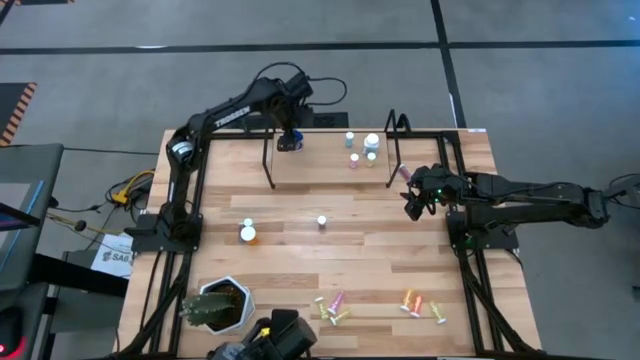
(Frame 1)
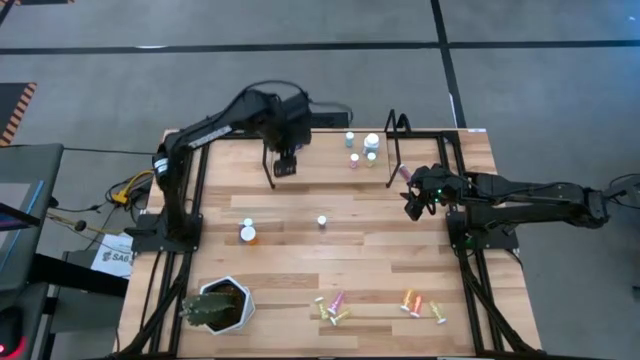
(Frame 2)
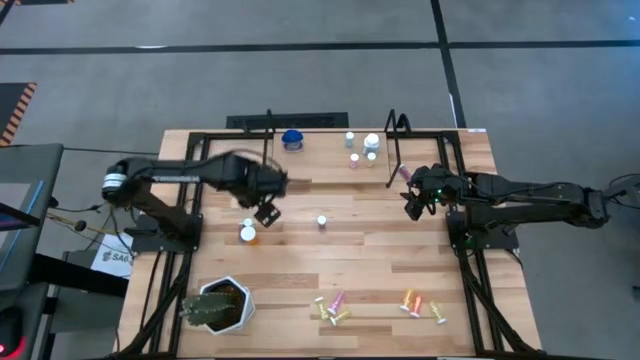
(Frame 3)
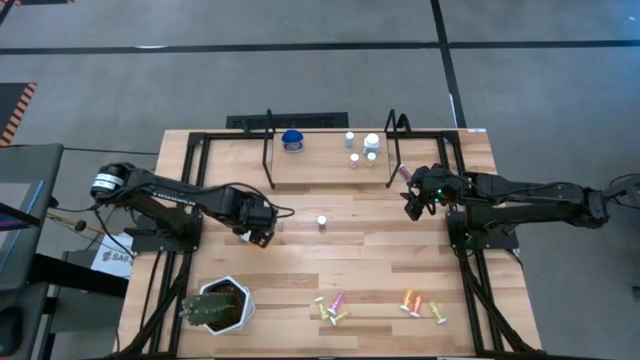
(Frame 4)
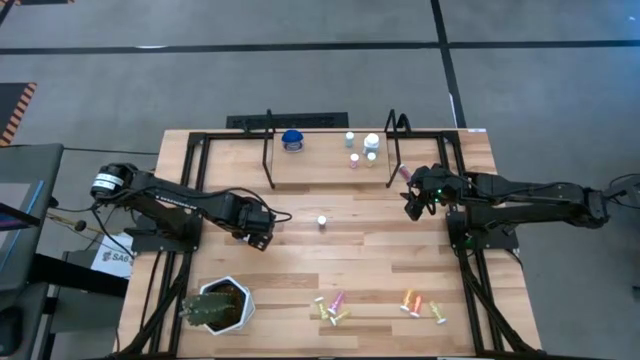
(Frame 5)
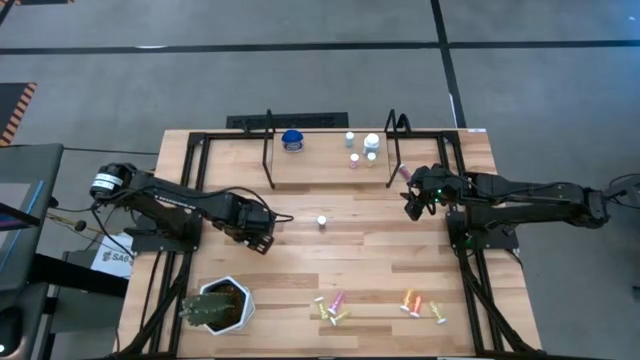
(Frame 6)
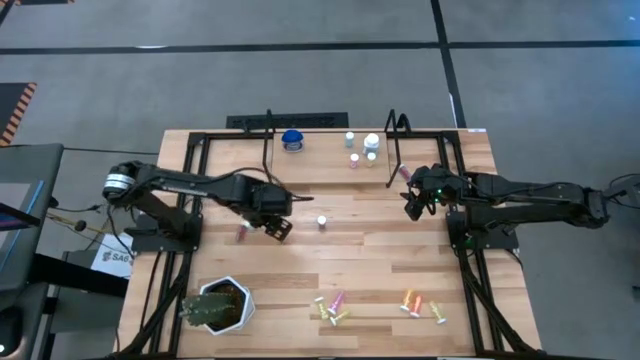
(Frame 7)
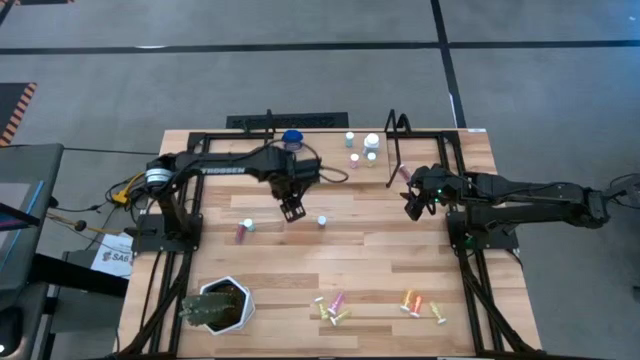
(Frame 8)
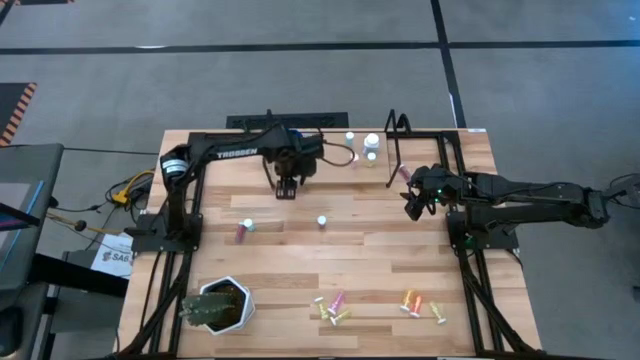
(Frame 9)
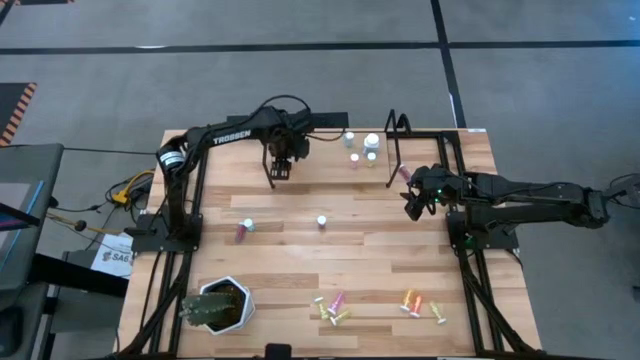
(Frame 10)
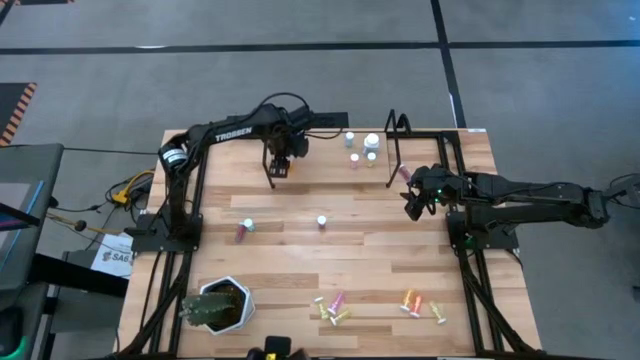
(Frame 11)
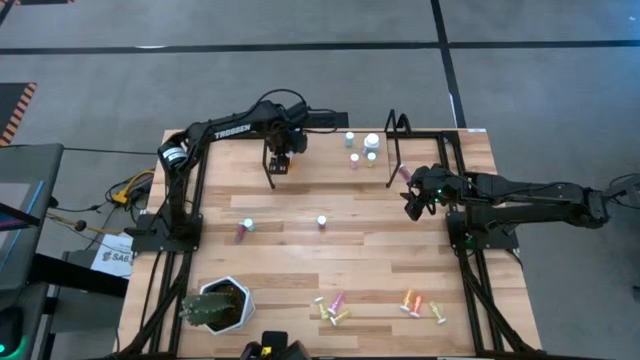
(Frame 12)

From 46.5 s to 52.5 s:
Task: Pick and place medicine bottles onto shelf by color
Put the orange pill bottle on the shelf

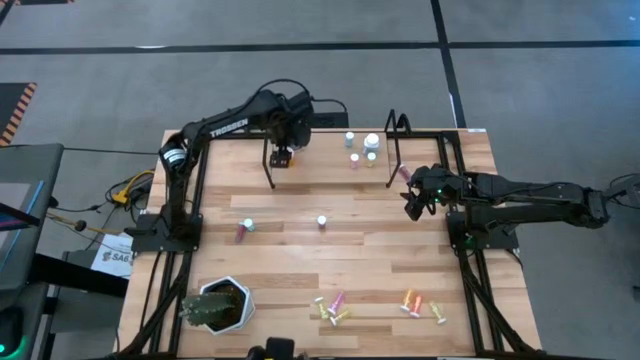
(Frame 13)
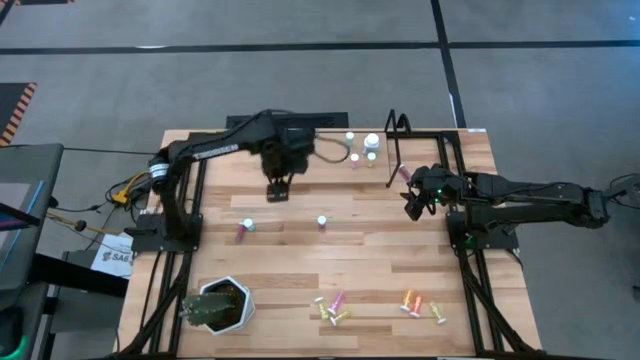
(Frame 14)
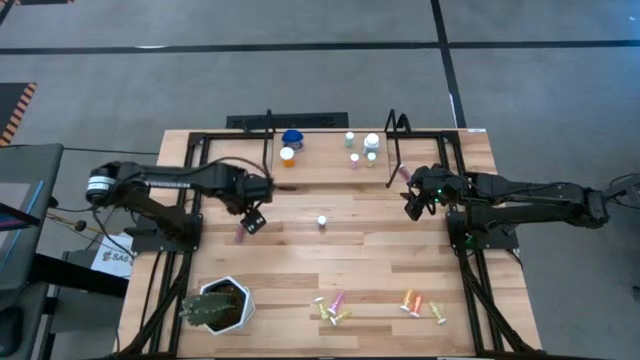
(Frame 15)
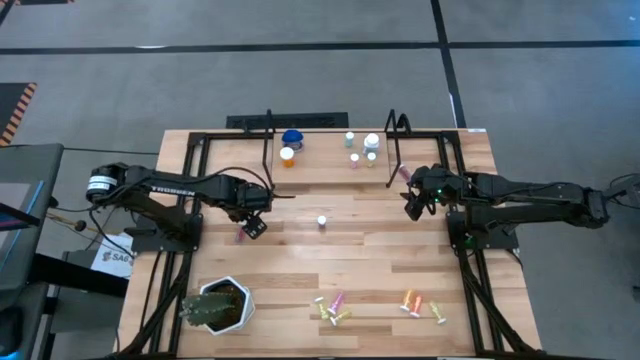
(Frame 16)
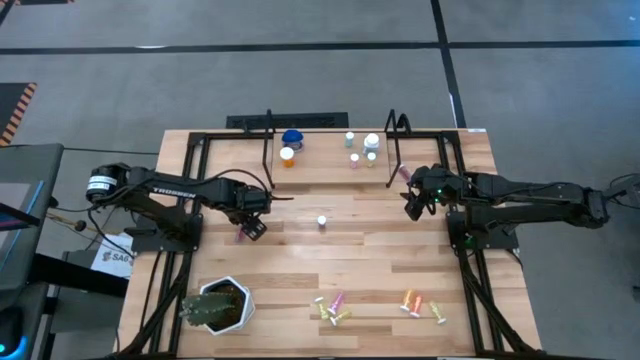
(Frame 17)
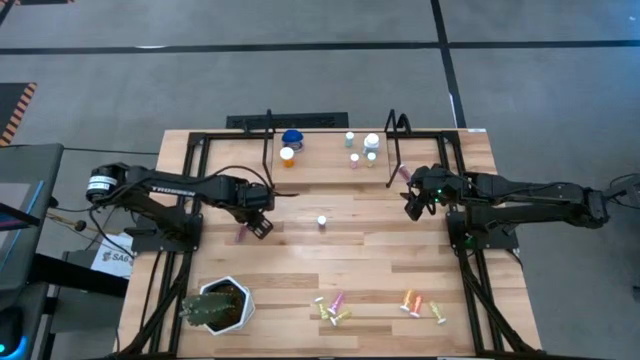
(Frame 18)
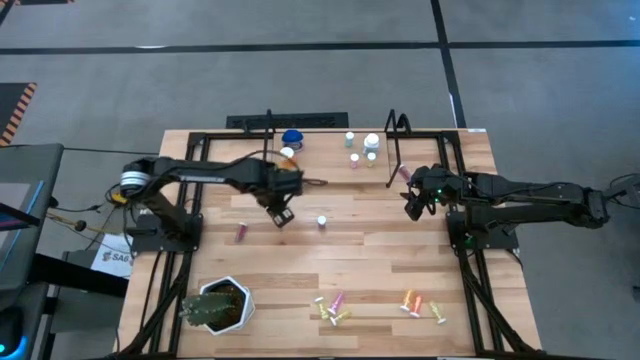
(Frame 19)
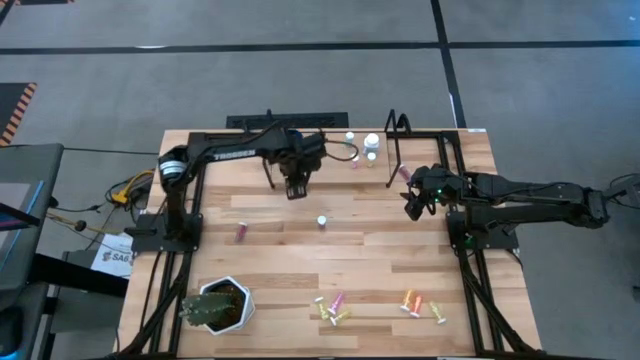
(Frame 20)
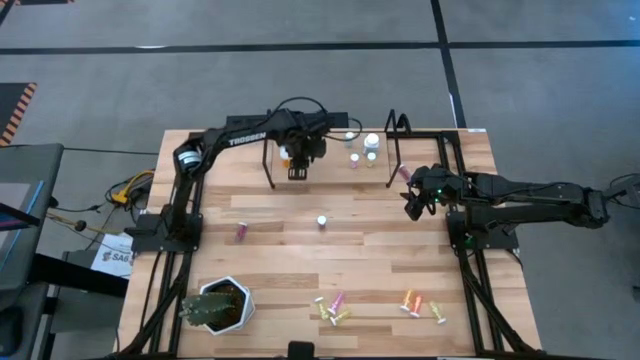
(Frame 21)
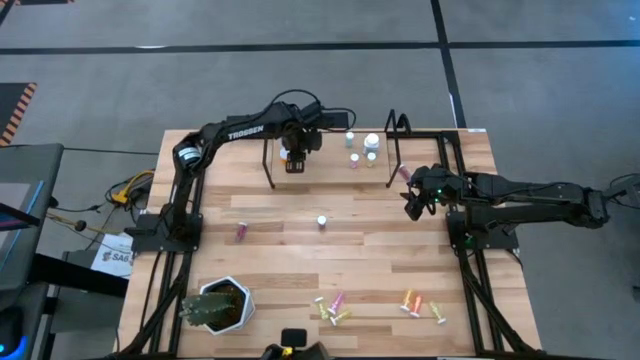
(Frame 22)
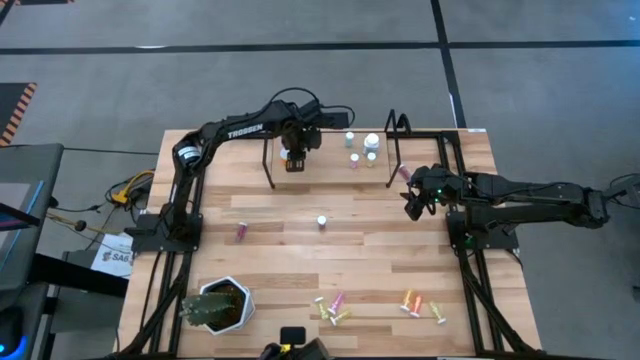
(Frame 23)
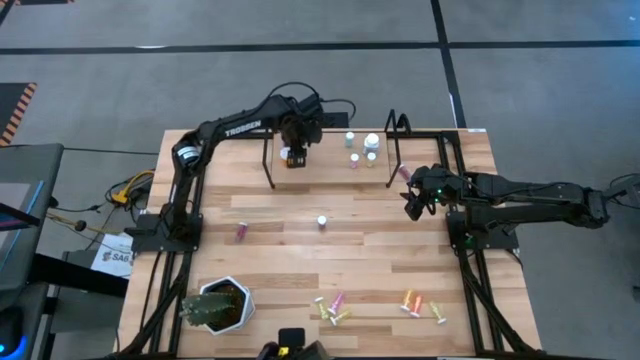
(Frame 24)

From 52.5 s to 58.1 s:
Put the blue pill bottle on the shelf

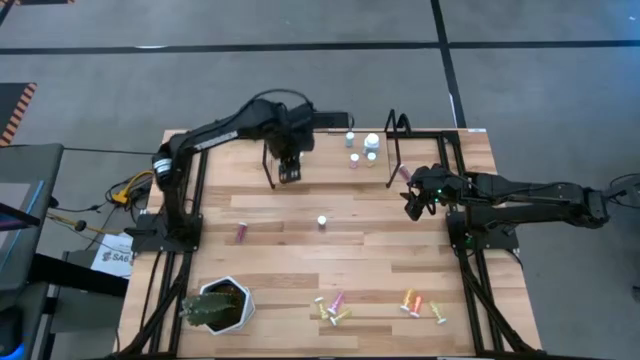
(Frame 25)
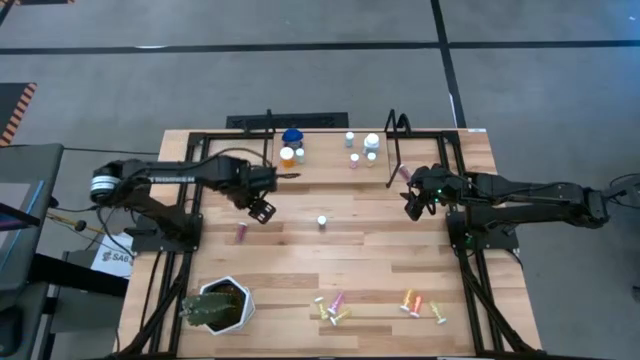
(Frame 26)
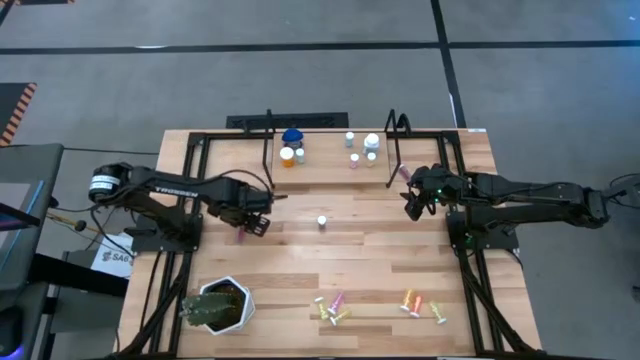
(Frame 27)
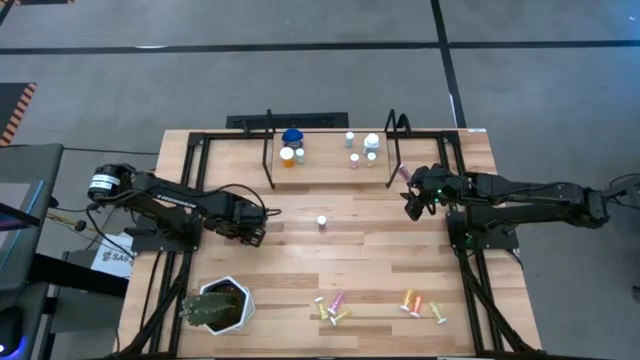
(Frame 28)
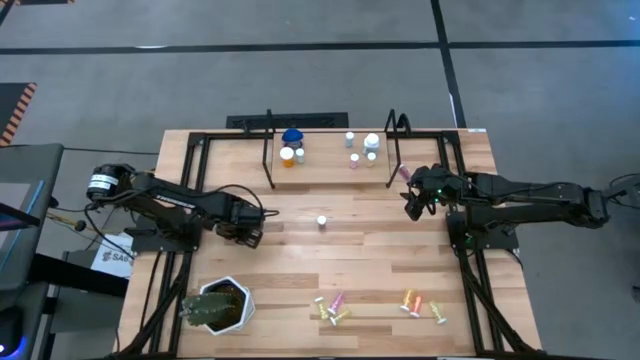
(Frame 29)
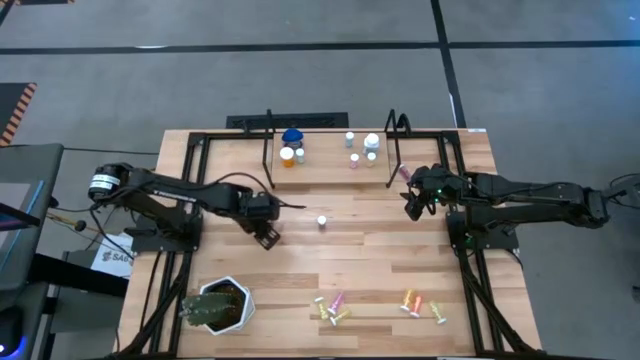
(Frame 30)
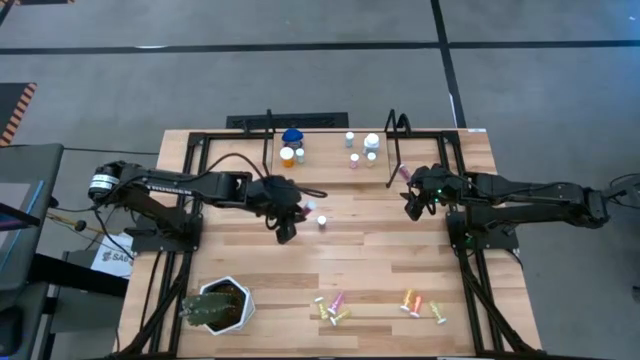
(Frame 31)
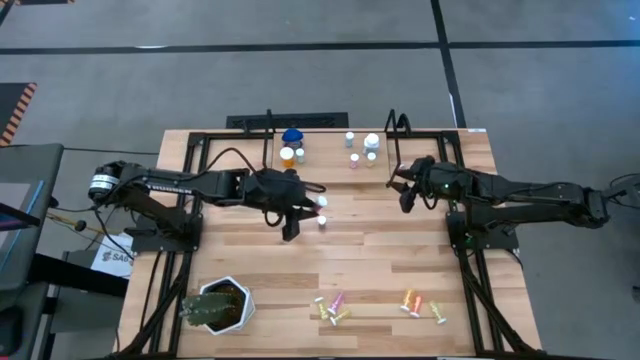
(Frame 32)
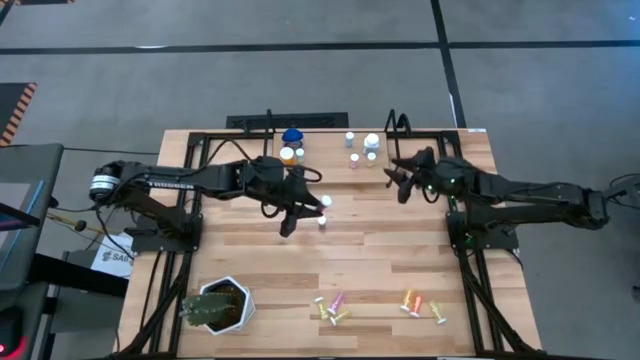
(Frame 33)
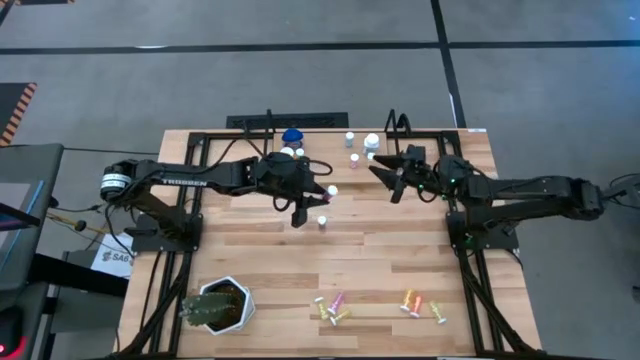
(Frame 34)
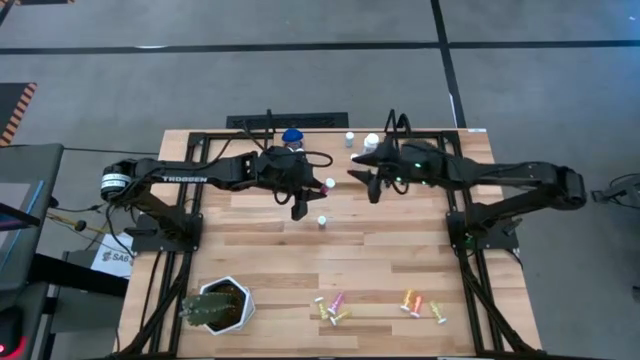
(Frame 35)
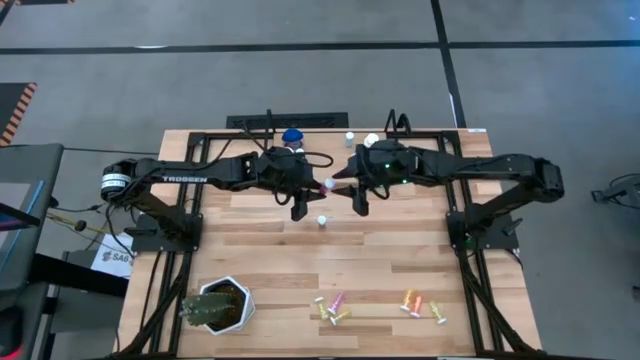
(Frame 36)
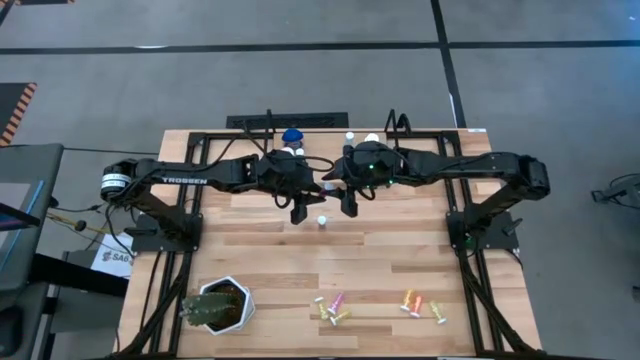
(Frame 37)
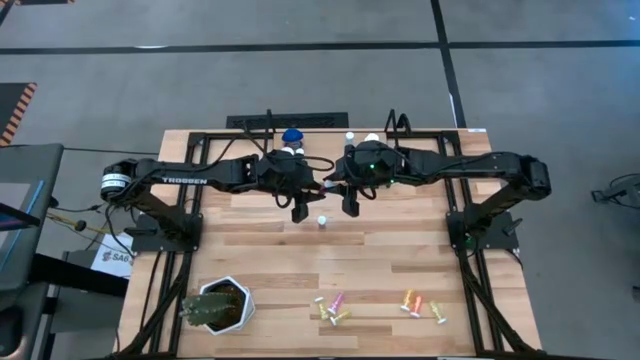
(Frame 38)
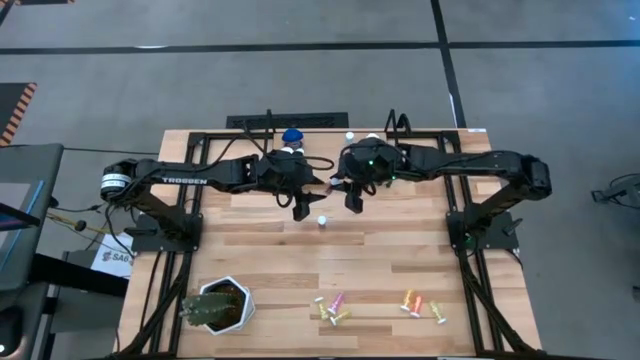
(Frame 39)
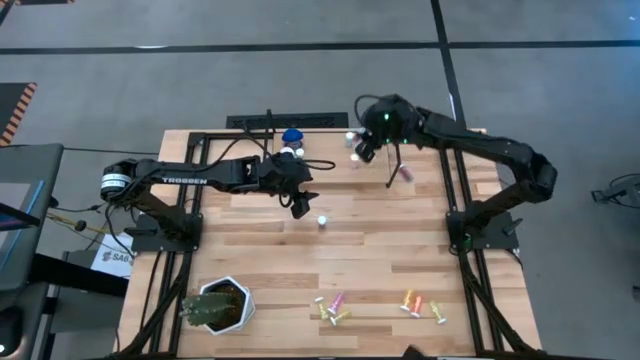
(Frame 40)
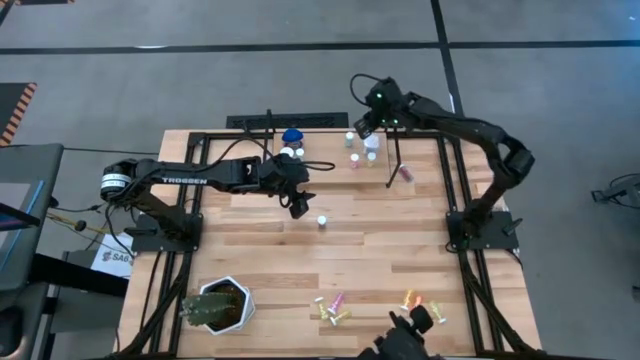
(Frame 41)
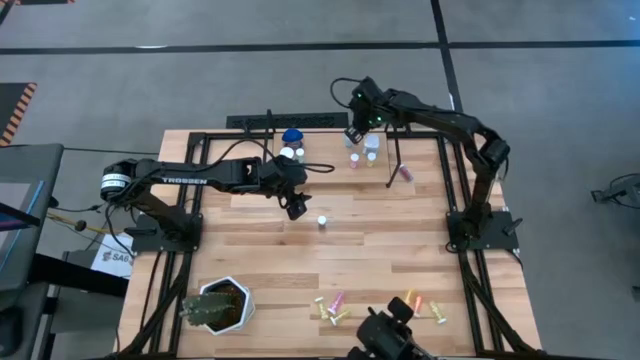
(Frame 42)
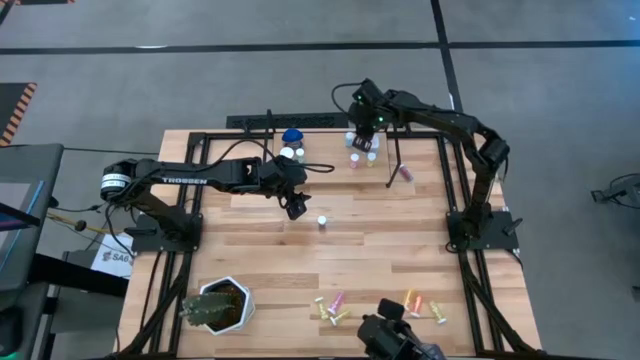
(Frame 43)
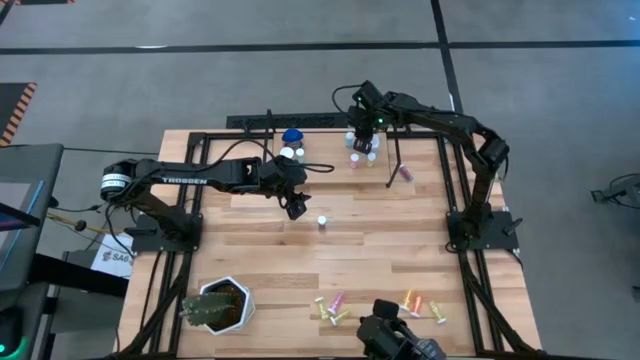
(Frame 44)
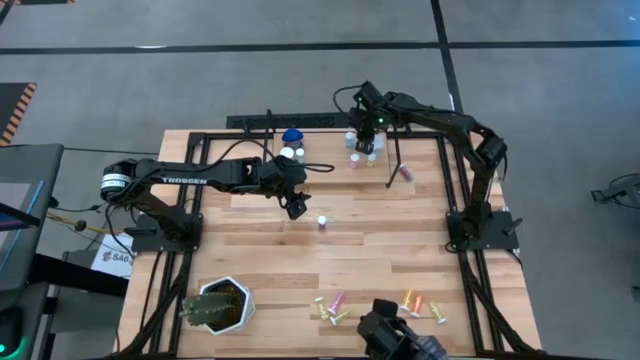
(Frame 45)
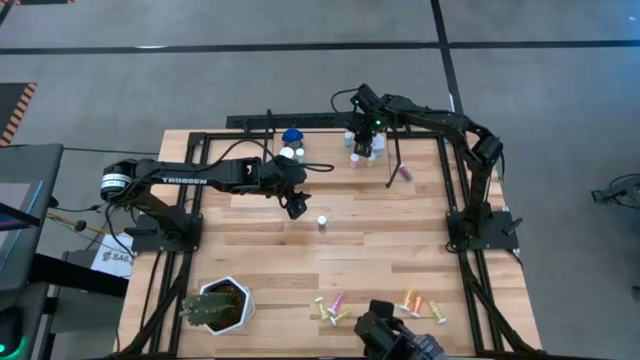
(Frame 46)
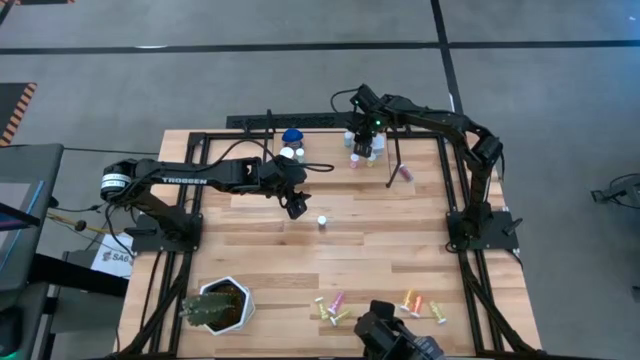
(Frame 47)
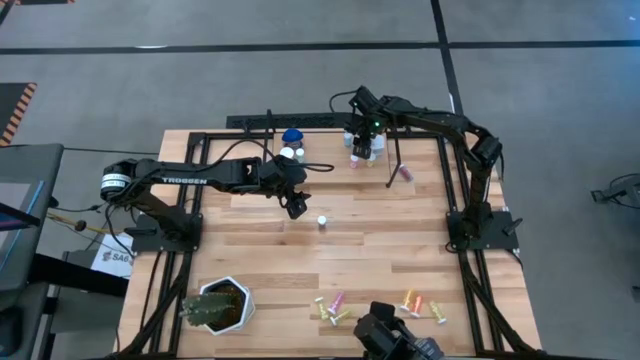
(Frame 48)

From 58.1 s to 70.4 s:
Put the blue pill bottle on the shelf
